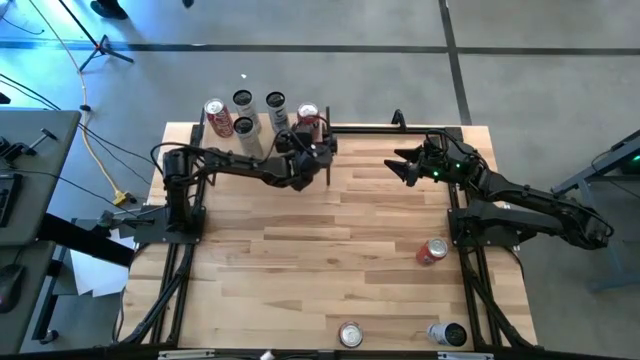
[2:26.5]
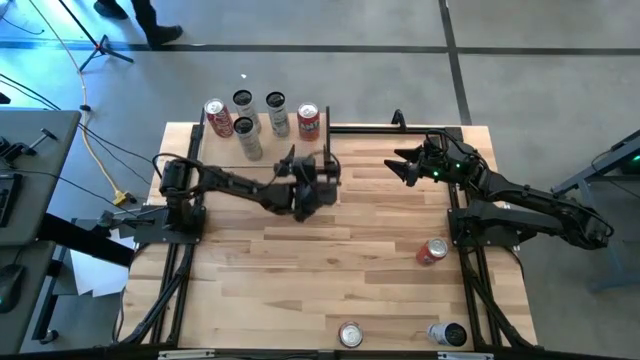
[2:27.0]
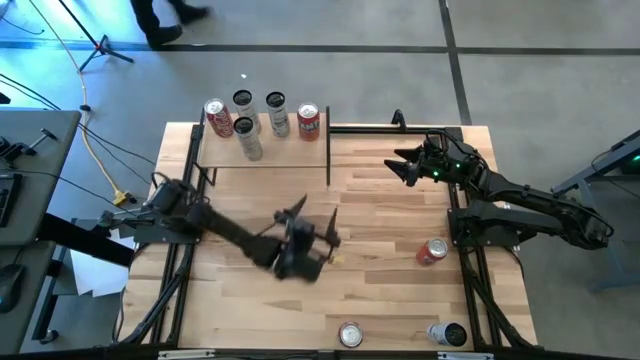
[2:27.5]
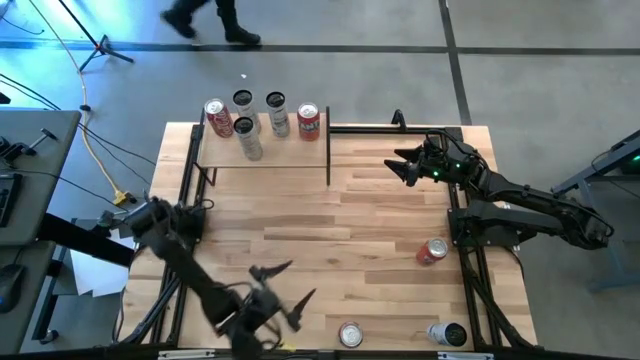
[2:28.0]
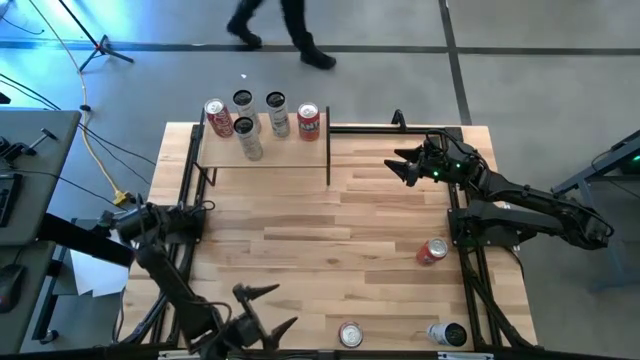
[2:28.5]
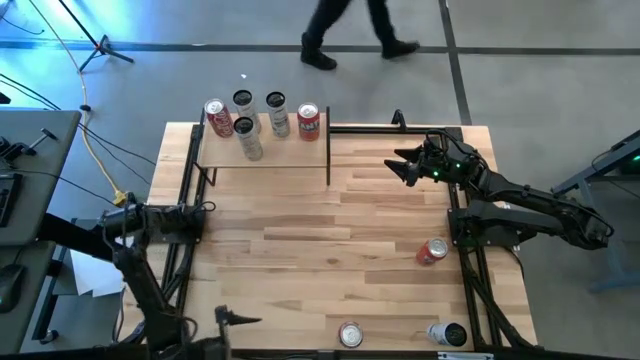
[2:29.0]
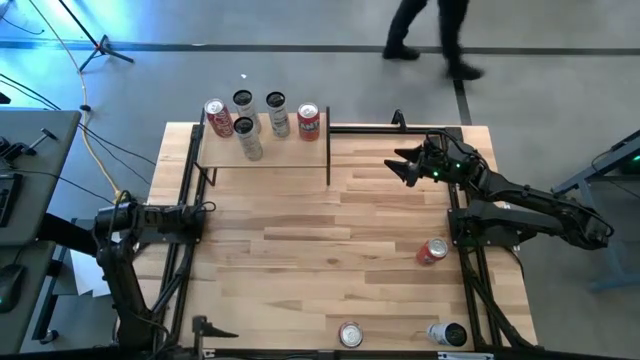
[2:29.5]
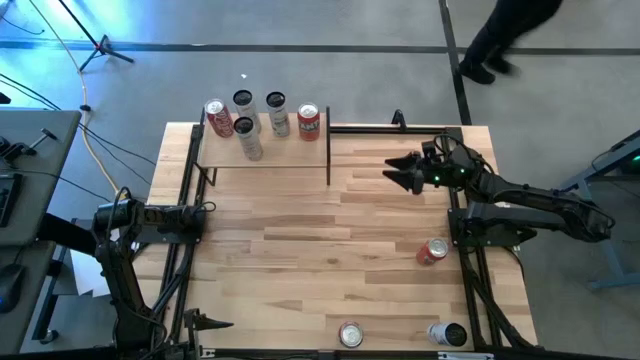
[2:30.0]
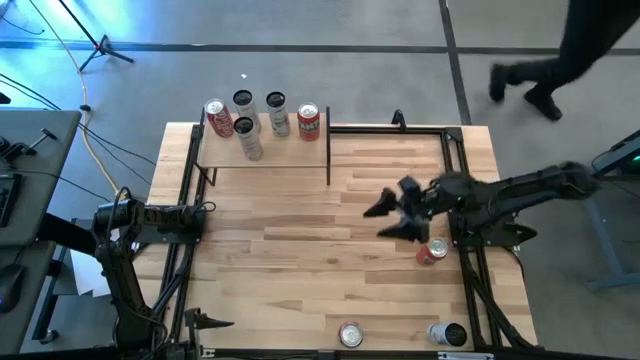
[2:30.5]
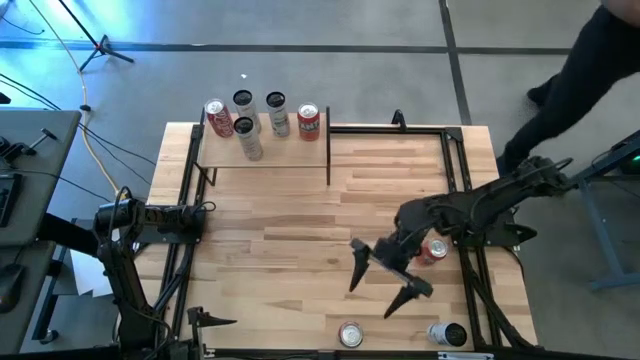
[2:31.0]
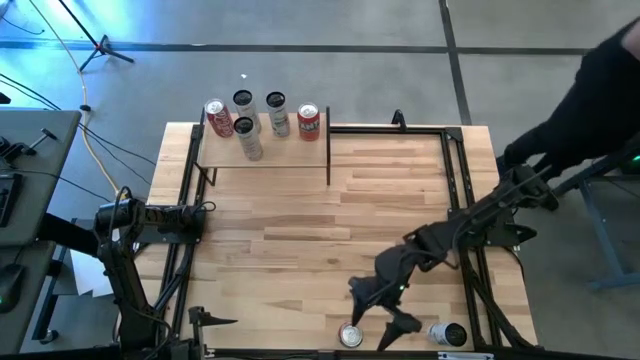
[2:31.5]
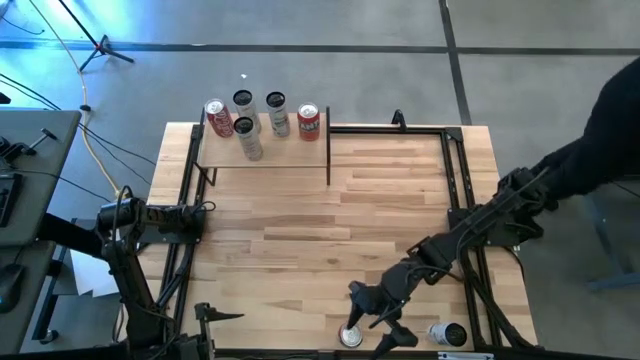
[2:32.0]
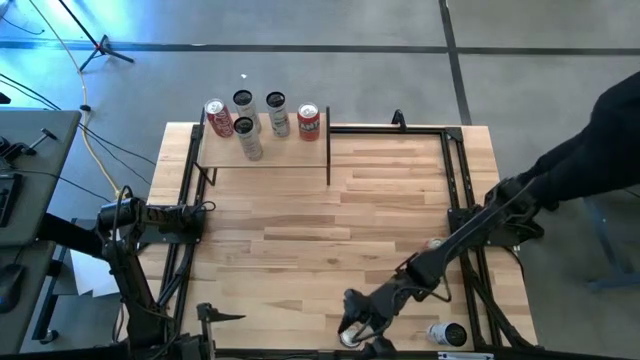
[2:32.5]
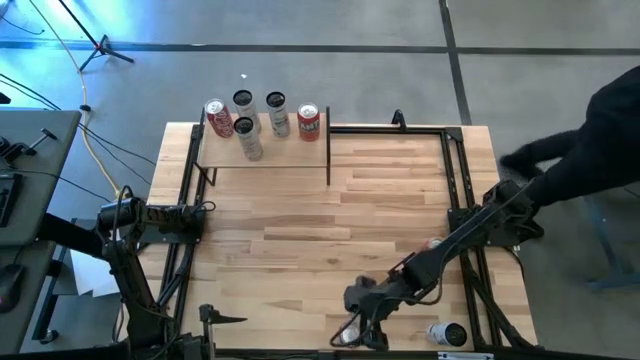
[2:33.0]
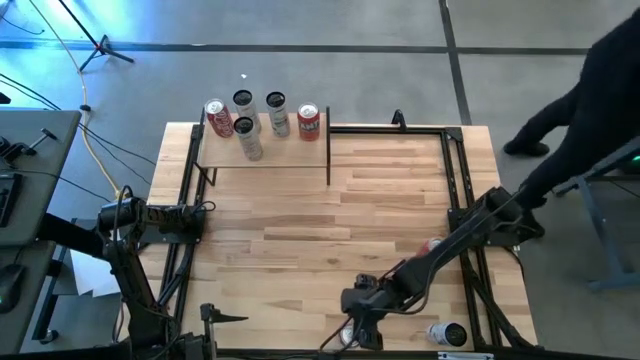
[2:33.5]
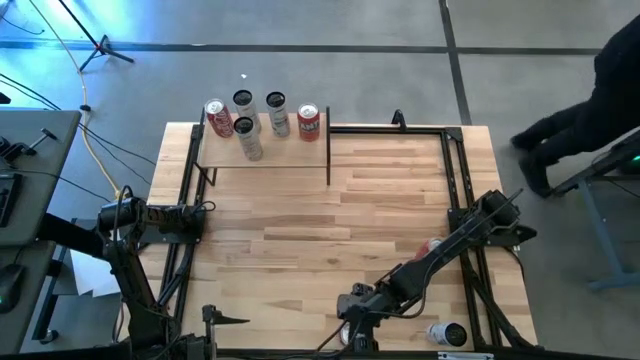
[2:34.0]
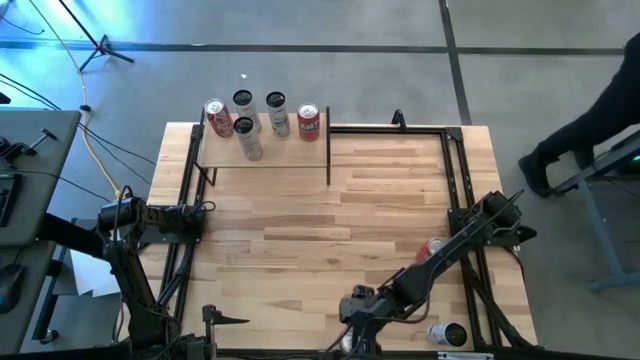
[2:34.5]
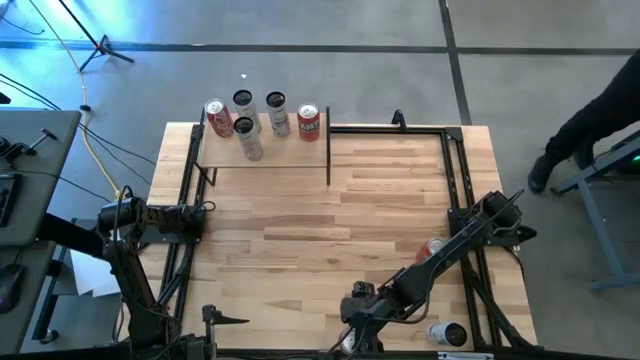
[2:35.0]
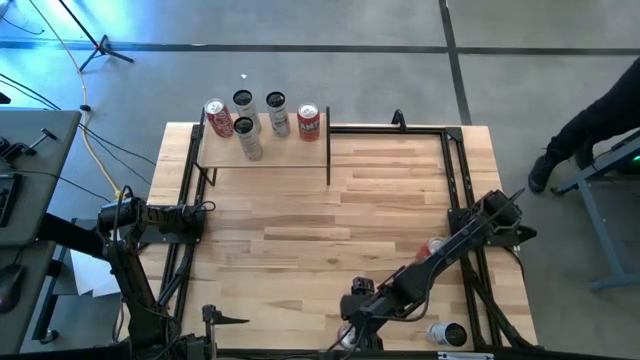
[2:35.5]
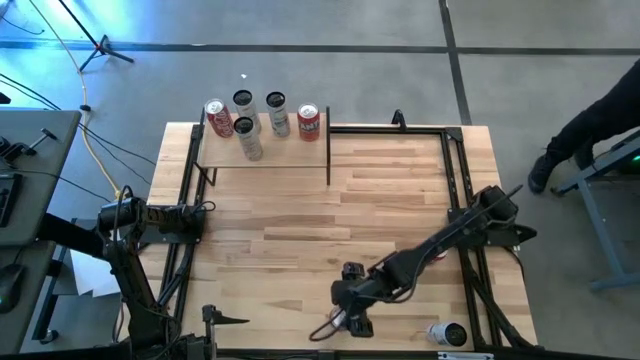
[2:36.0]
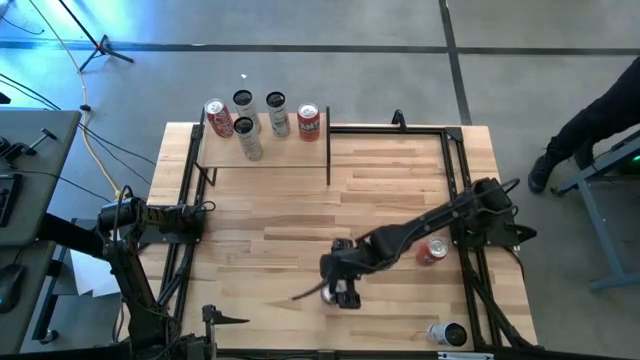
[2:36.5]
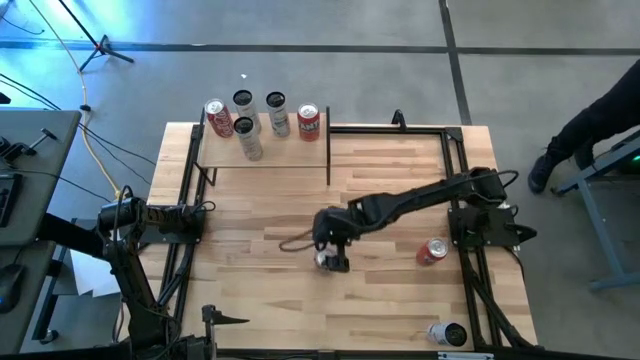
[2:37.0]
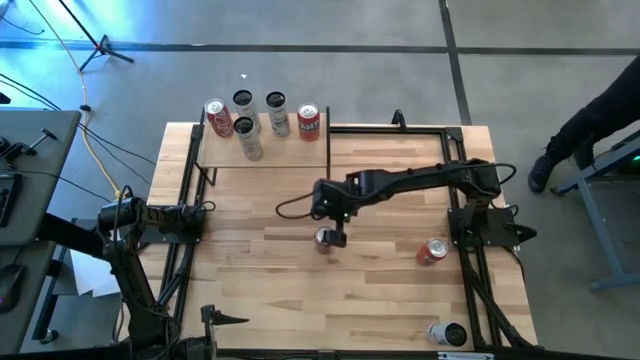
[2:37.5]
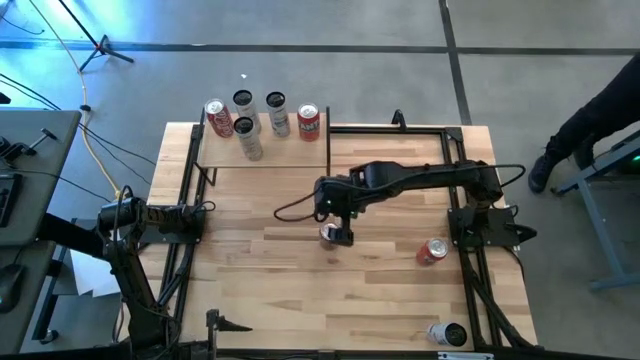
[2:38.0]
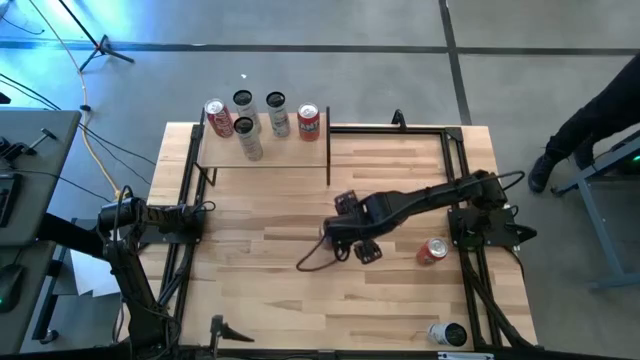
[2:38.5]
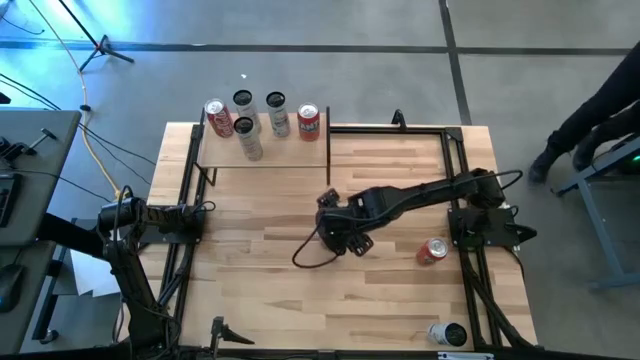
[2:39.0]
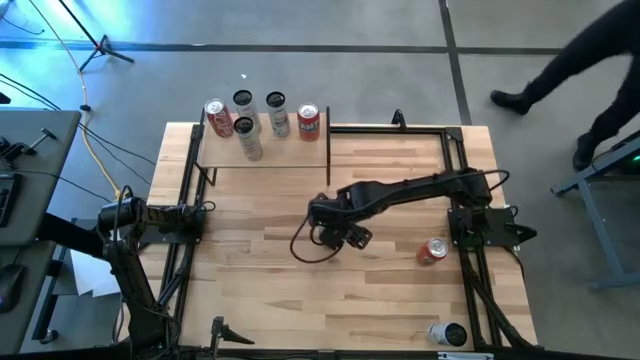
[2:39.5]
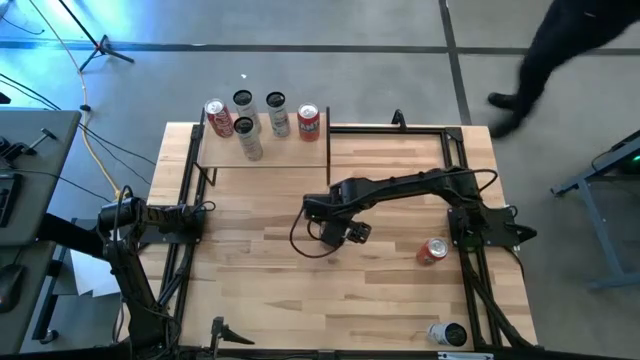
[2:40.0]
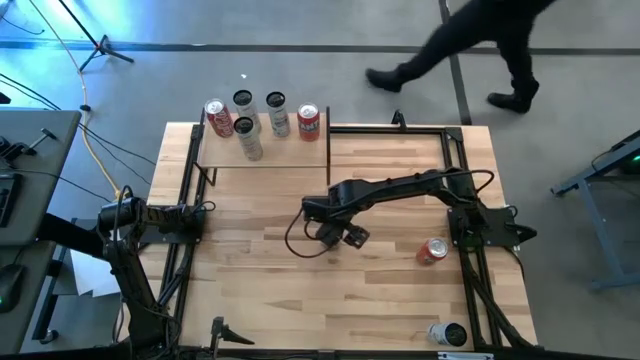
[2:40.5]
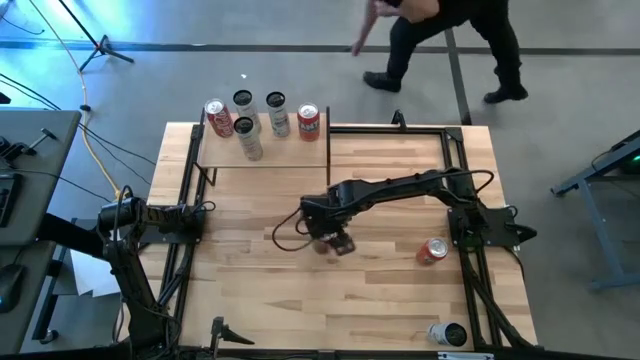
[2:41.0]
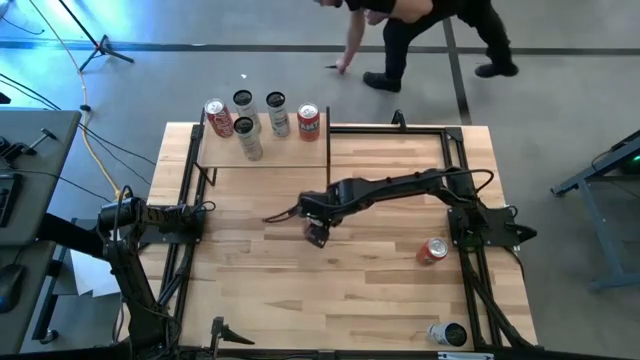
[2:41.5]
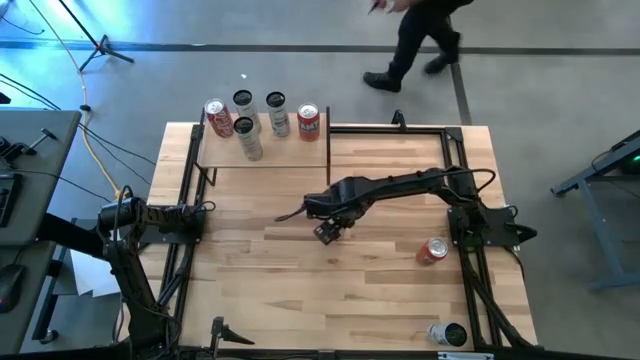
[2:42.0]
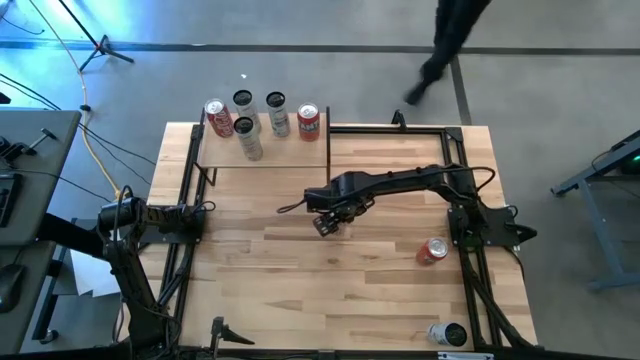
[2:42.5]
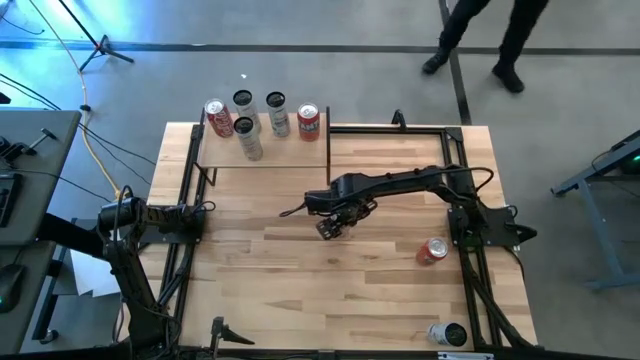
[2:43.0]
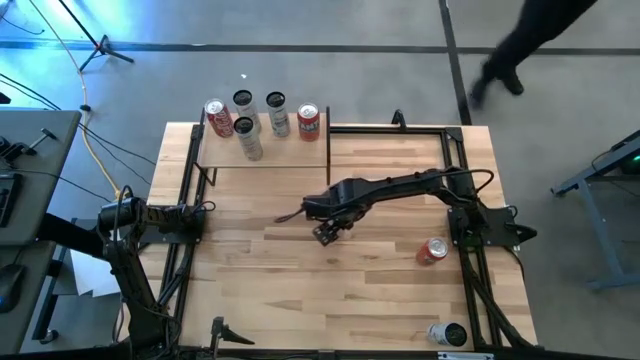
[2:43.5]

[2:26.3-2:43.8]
Task: Place canned beverage on shelf
Put the red soda can on the shelf aligned with the other red soda can

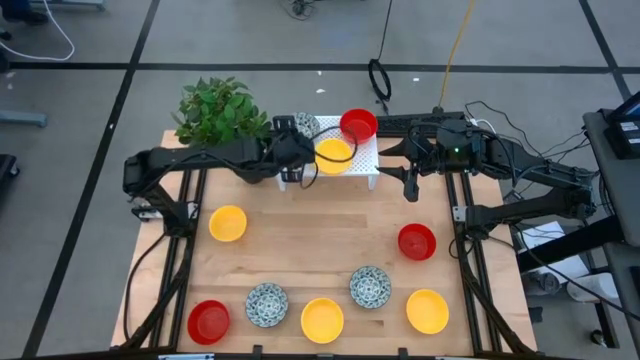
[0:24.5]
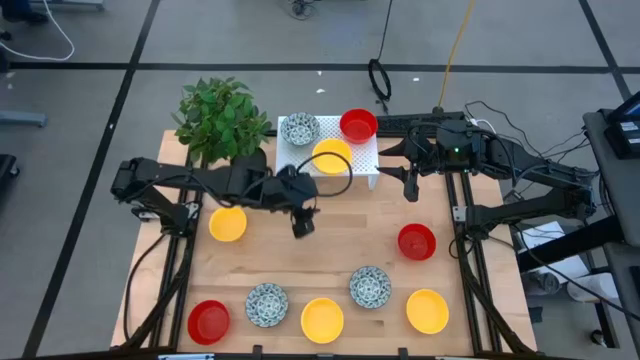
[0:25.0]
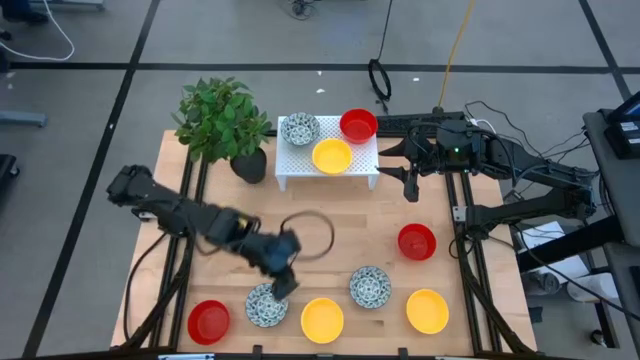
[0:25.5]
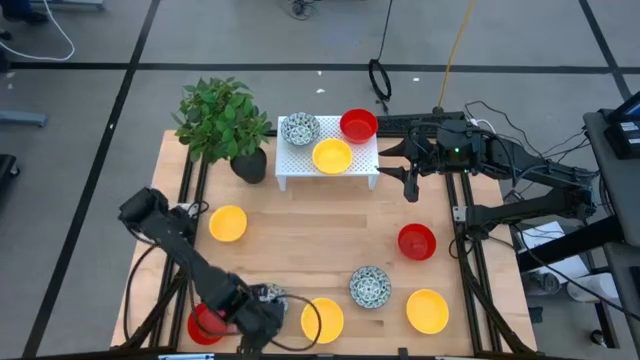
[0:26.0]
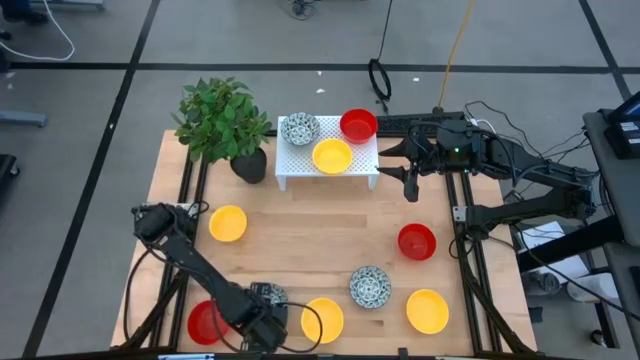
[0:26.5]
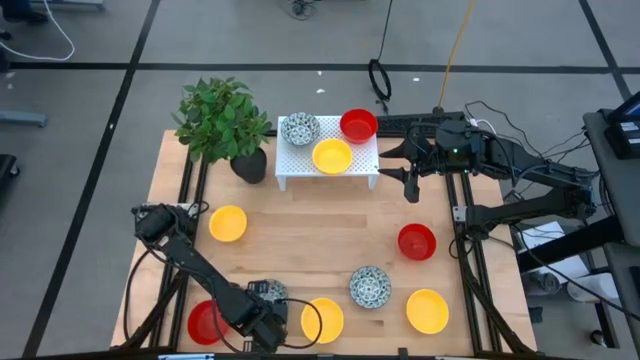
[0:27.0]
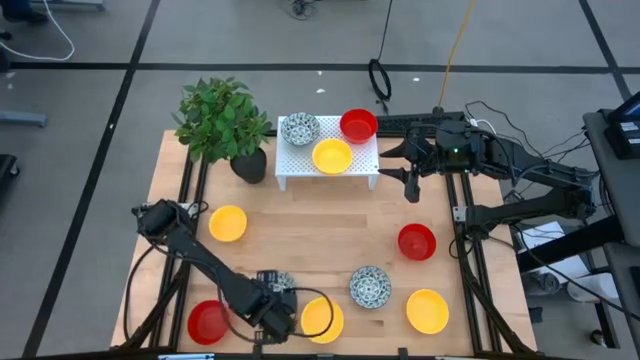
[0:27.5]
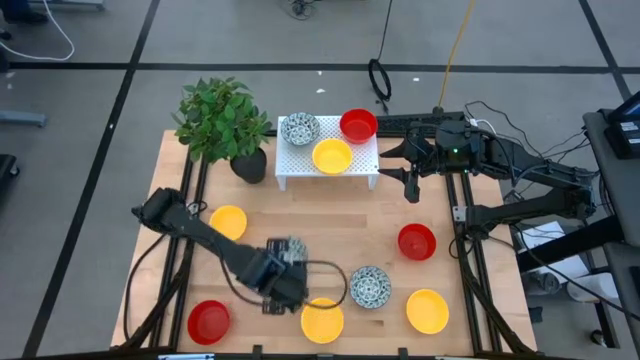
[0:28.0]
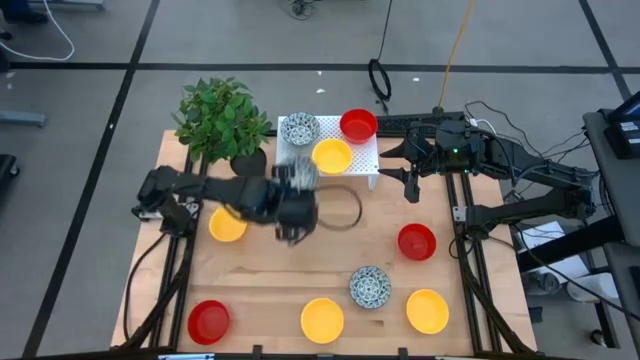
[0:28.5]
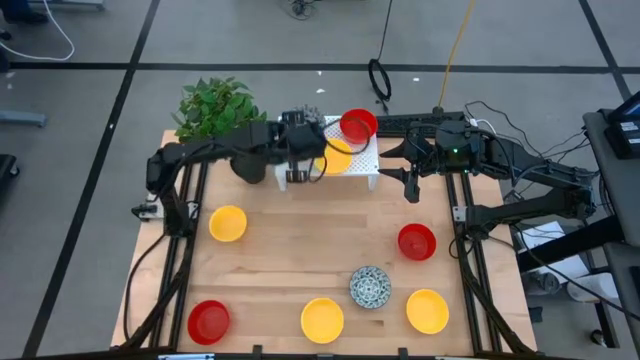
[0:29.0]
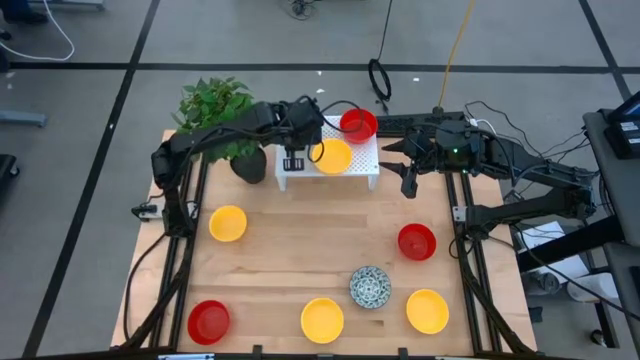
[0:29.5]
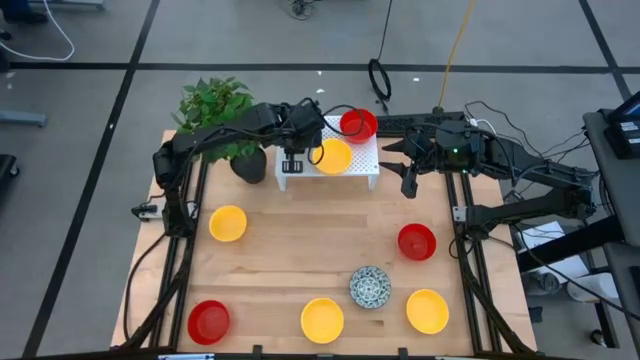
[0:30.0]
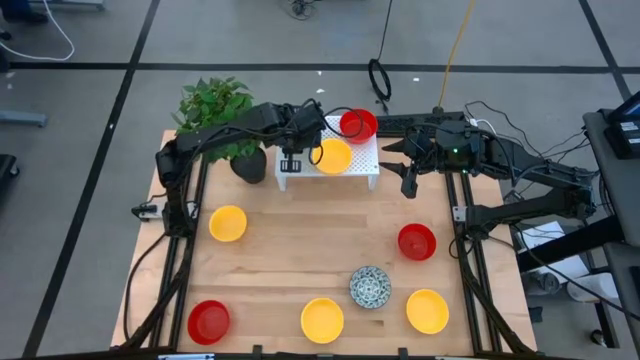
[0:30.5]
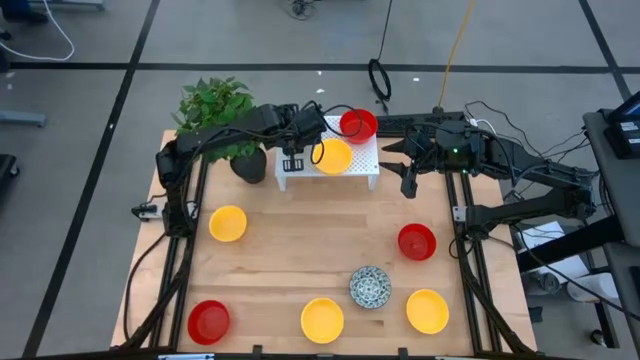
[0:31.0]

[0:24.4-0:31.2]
Task: Pick & Place Mini bowls
Stack the white patterned bowl on top of the white patterned bowl on the shelf
